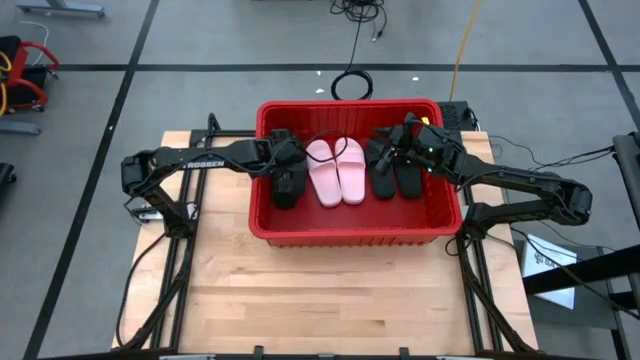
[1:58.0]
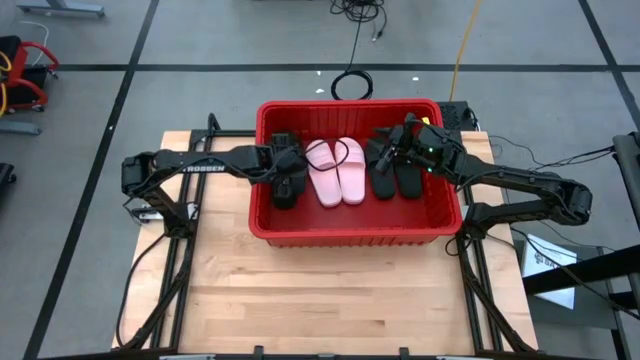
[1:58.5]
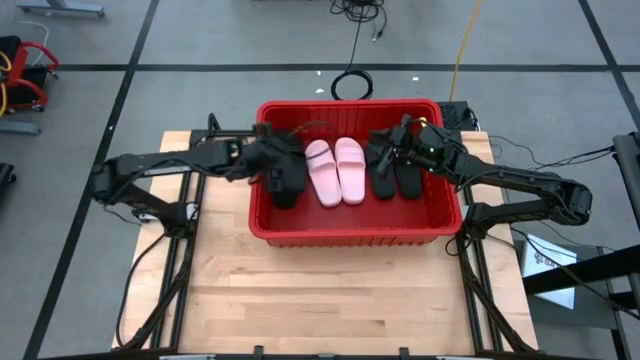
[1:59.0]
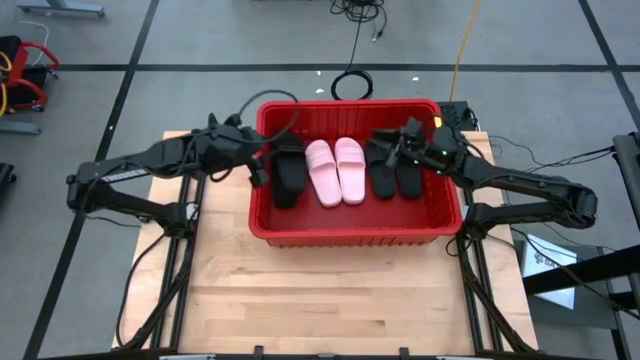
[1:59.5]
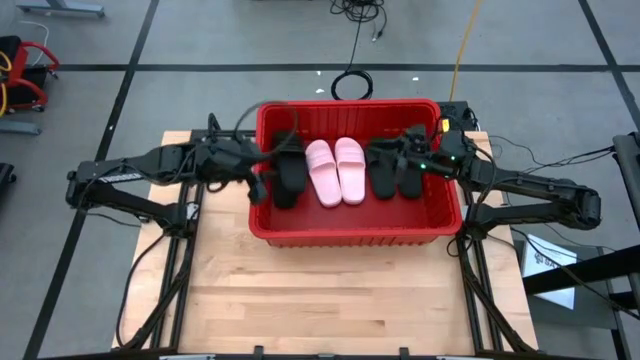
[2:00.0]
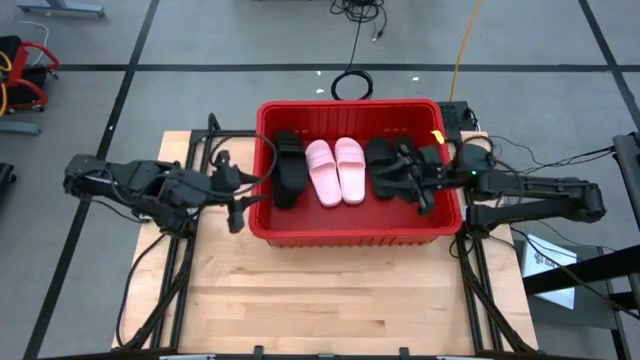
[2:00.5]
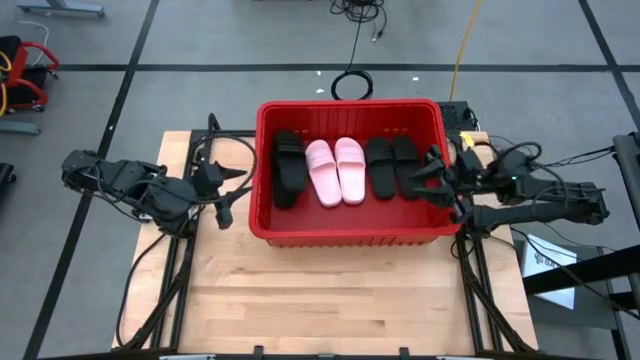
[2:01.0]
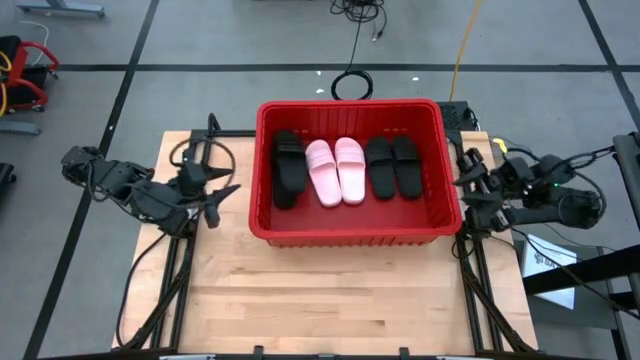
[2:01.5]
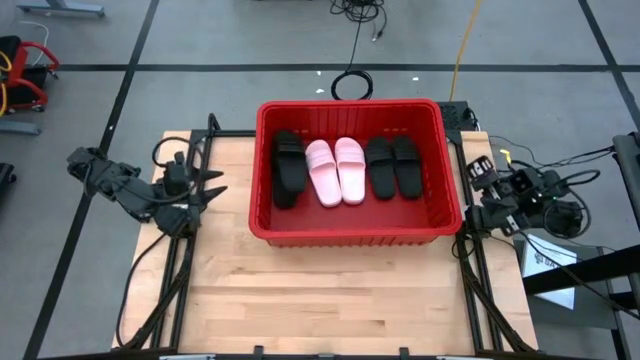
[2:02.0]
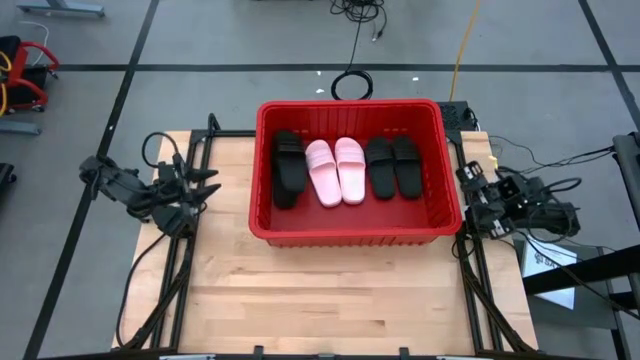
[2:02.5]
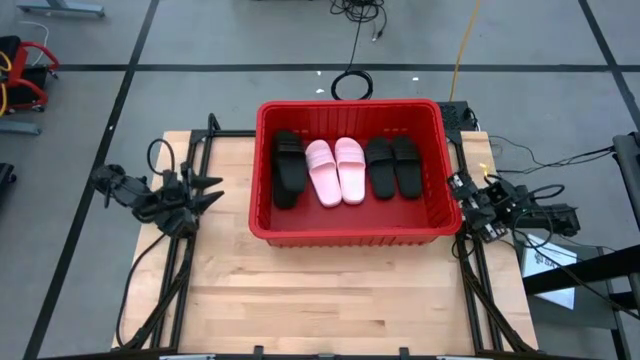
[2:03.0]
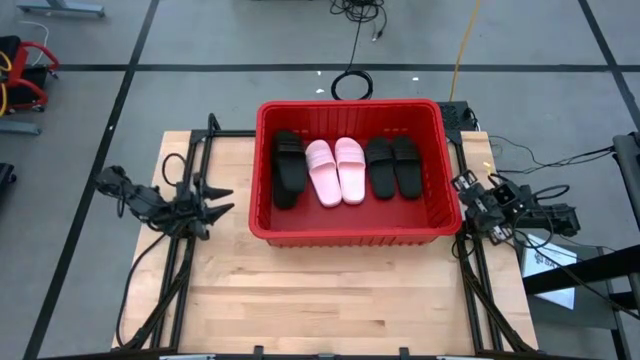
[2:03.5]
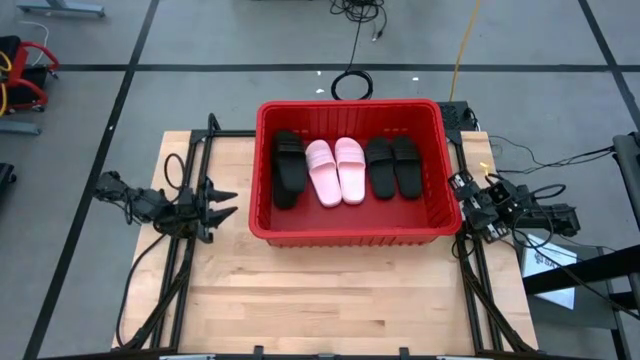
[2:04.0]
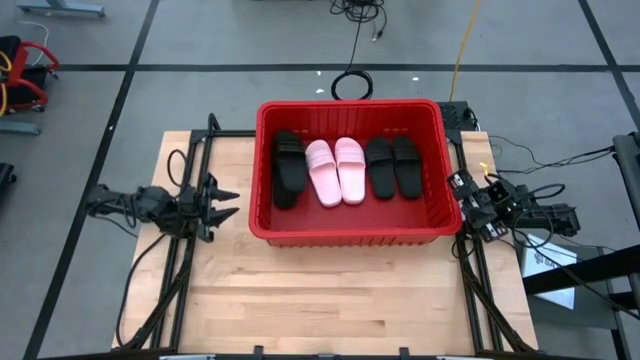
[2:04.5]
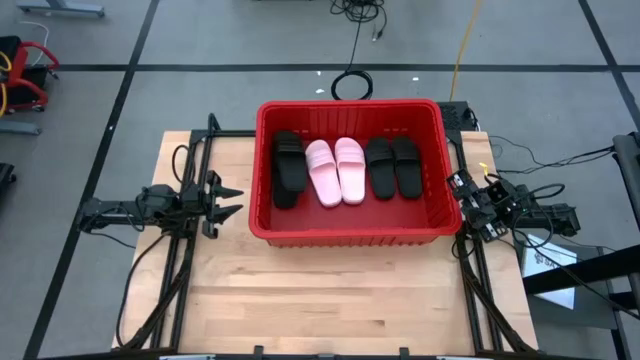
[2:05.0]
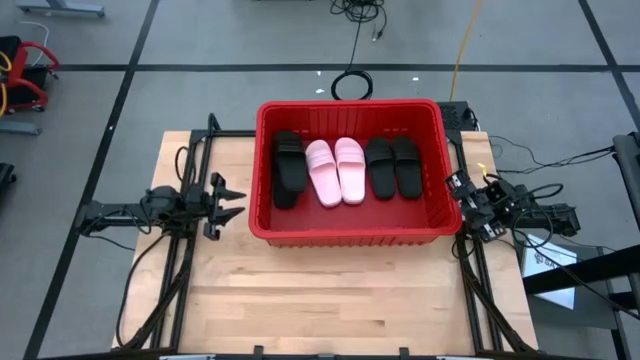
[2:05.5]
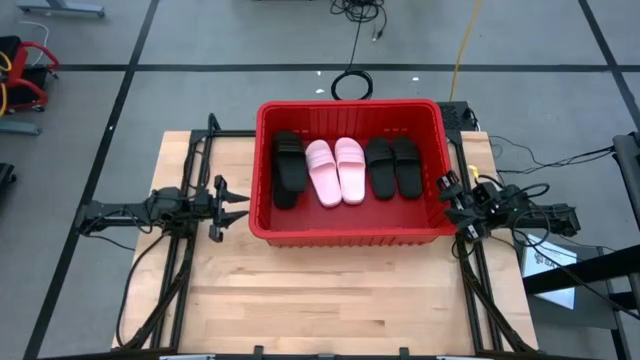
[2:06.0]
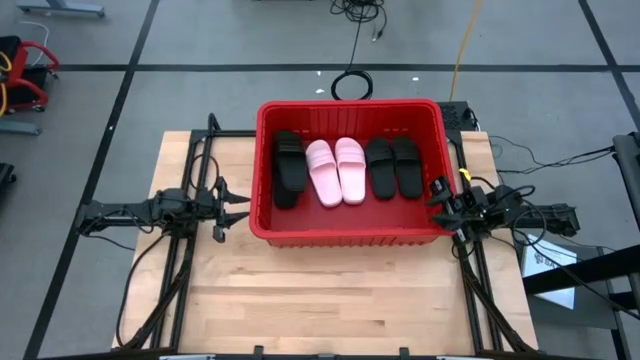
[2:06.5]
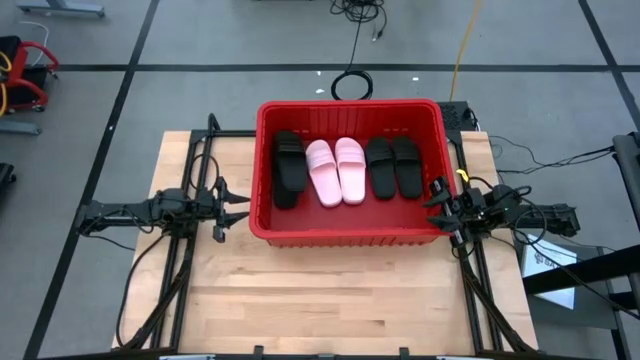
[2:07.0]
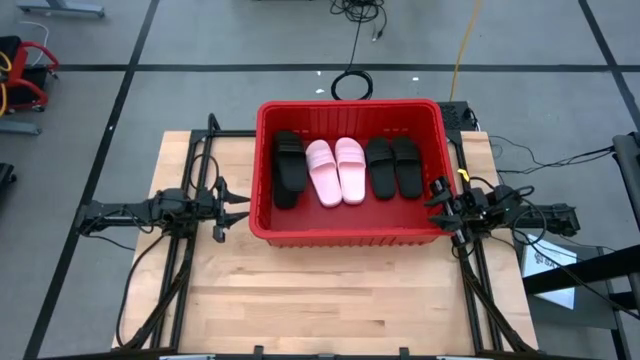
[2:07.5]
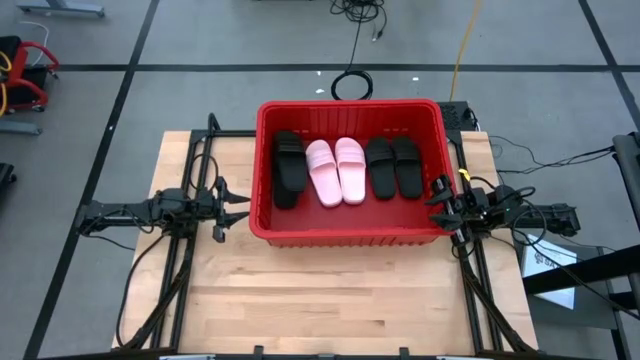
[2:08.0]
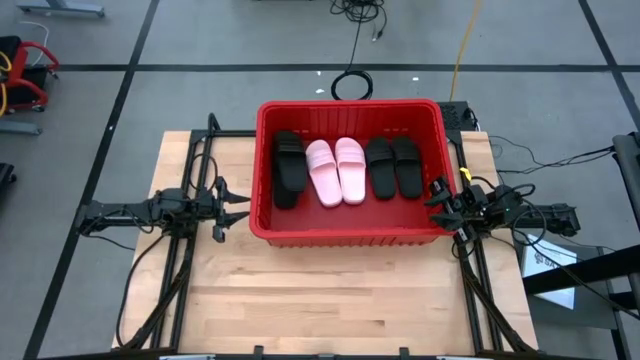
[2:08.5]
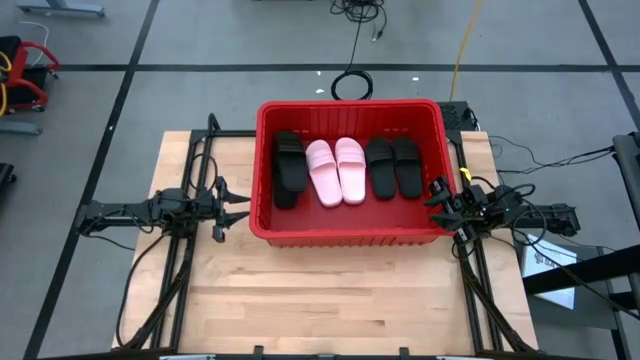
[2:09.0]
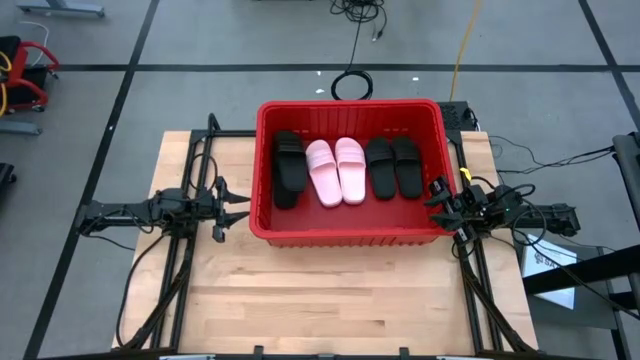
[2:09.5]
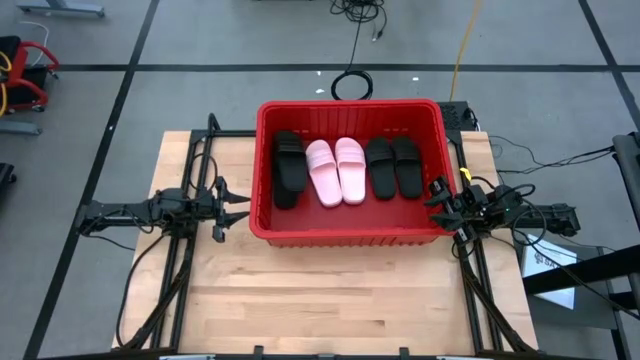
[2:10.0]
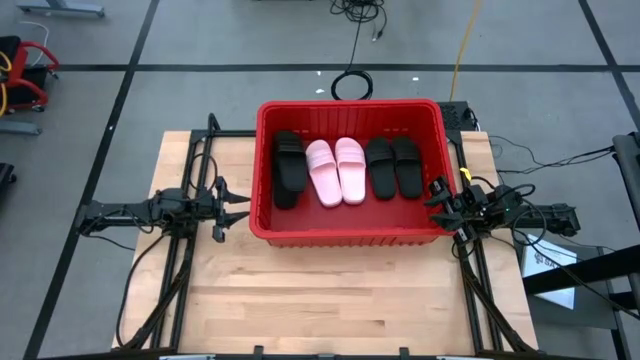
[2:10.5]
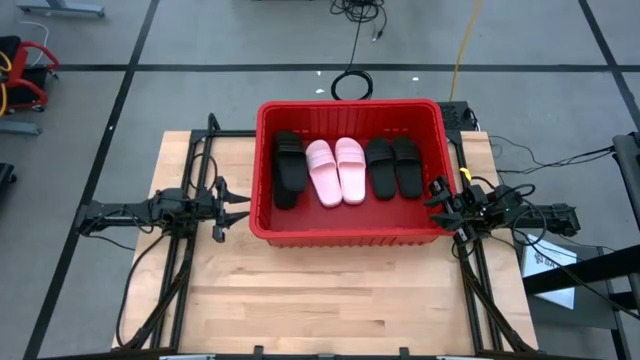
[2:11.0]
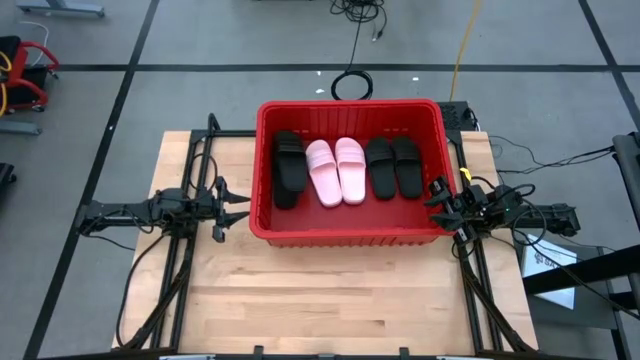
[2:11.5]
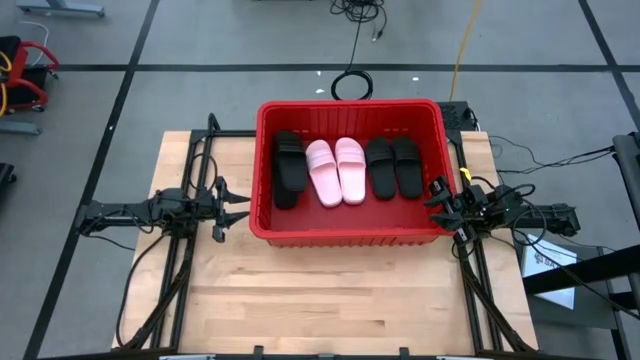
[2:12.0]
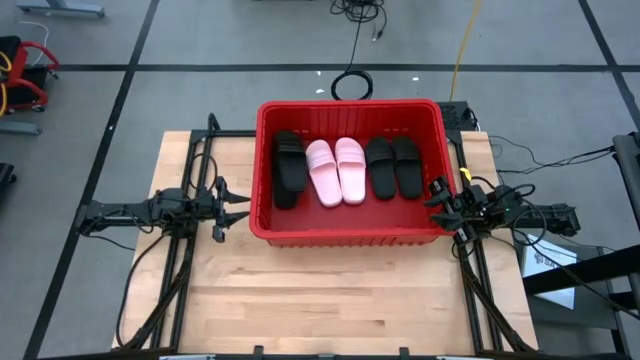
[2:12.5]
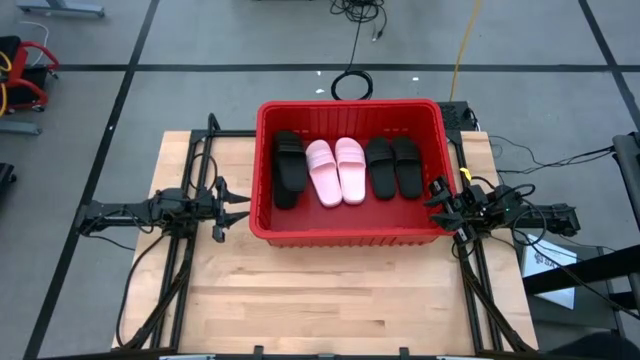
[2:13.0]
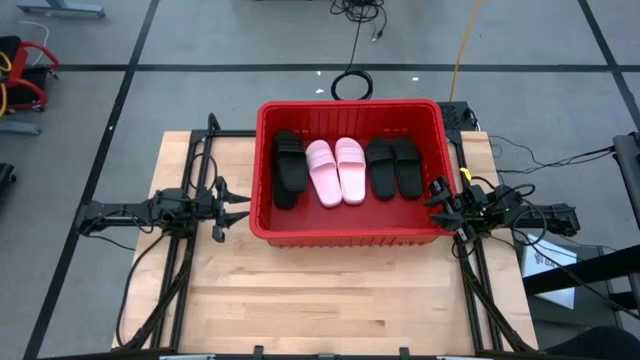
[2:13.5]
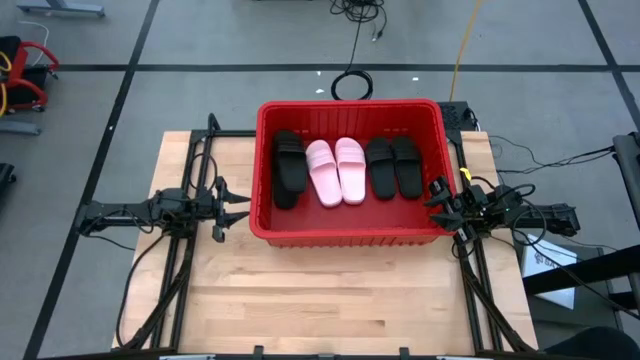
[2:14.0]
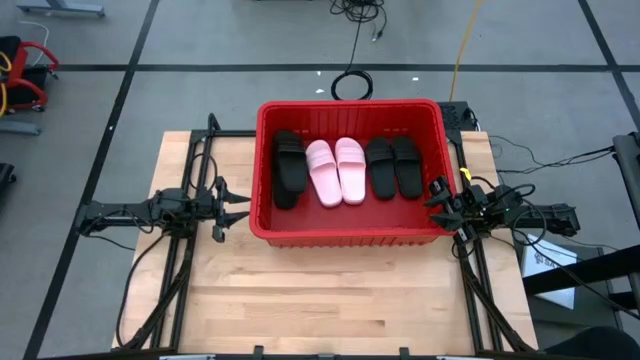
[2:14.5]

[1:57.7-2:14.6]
Task: Pick and place slides into bin
Return to home position

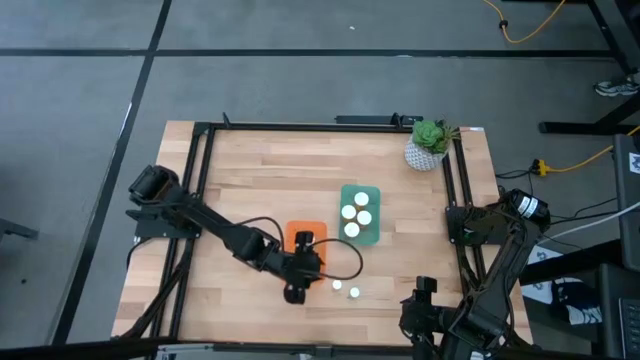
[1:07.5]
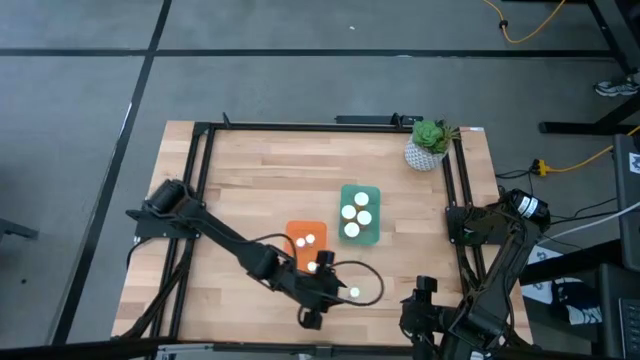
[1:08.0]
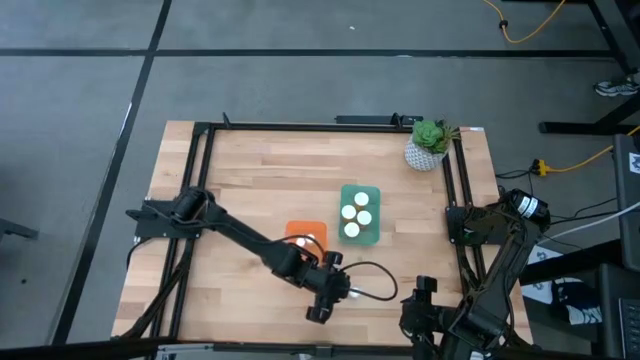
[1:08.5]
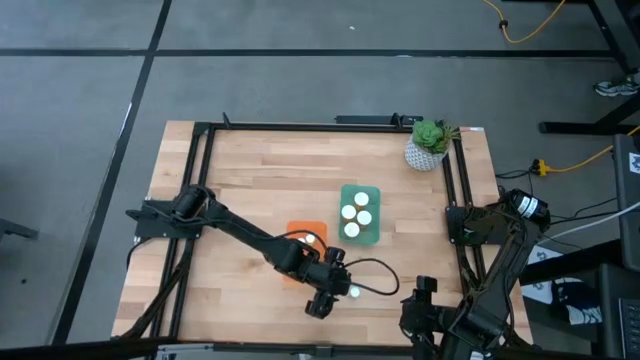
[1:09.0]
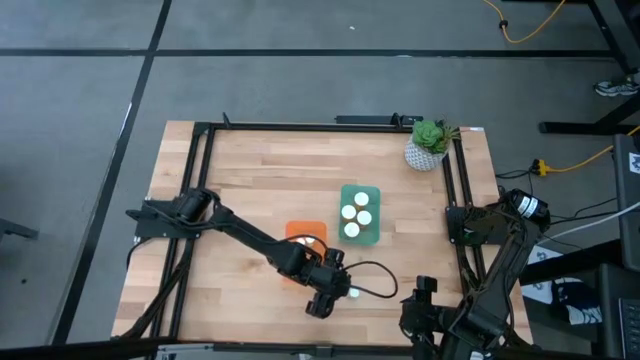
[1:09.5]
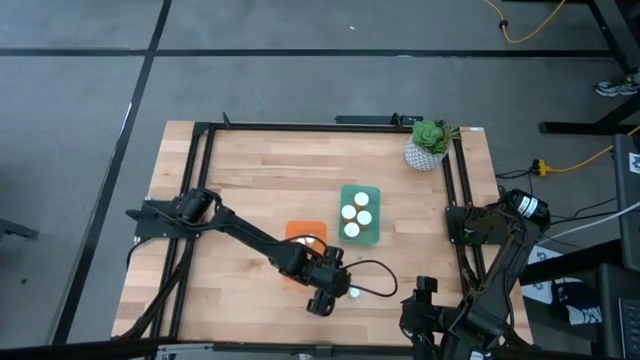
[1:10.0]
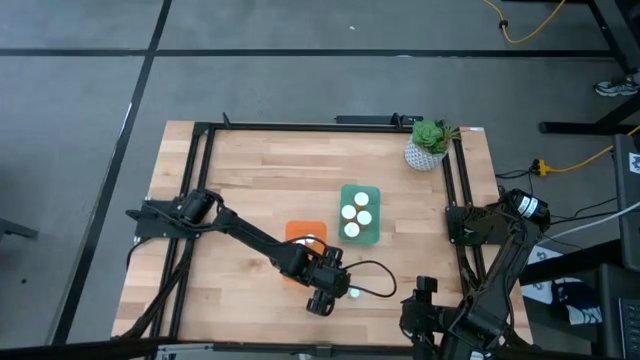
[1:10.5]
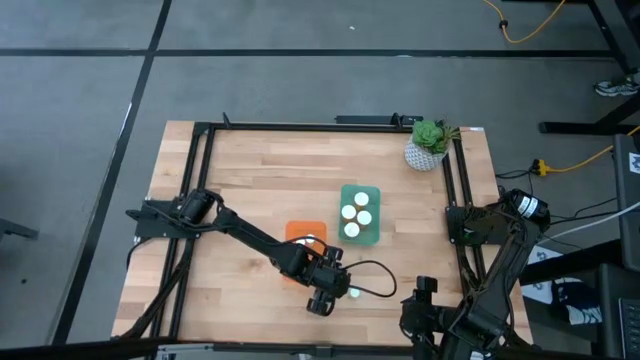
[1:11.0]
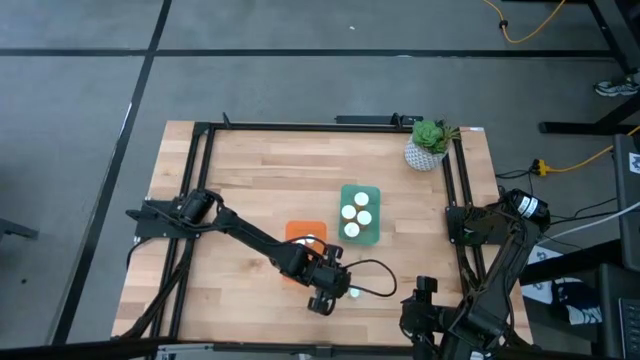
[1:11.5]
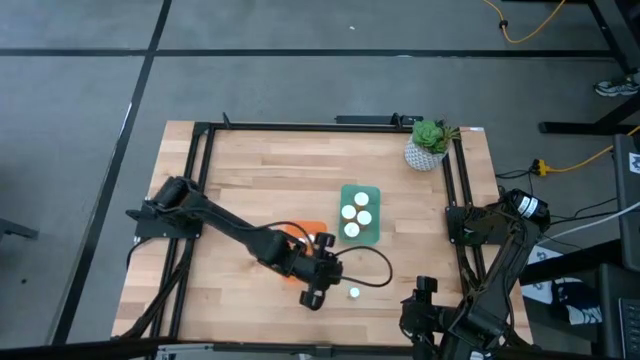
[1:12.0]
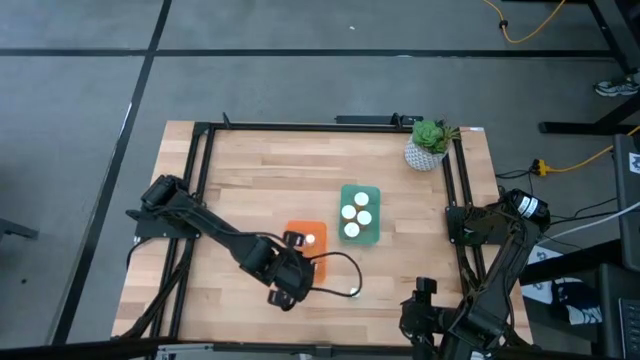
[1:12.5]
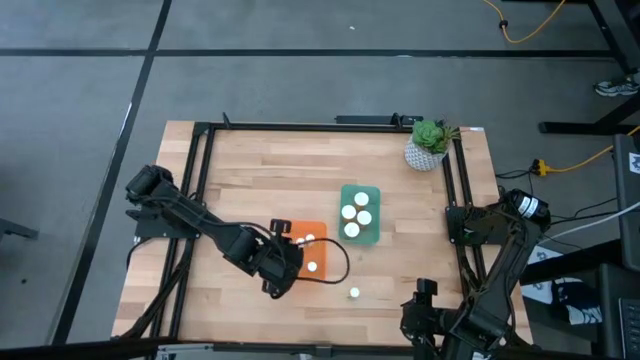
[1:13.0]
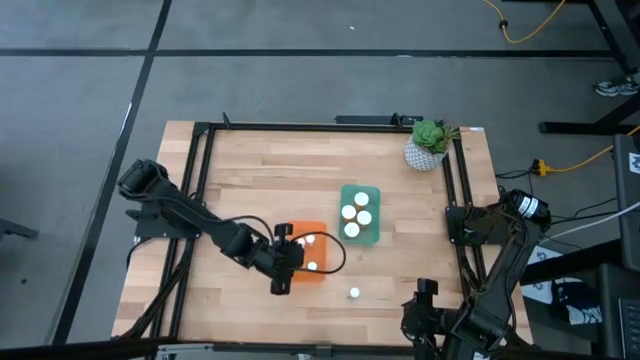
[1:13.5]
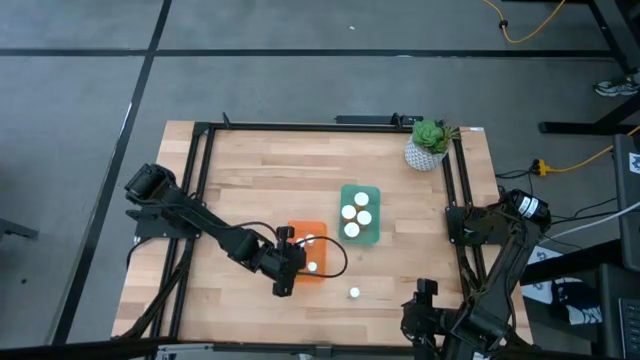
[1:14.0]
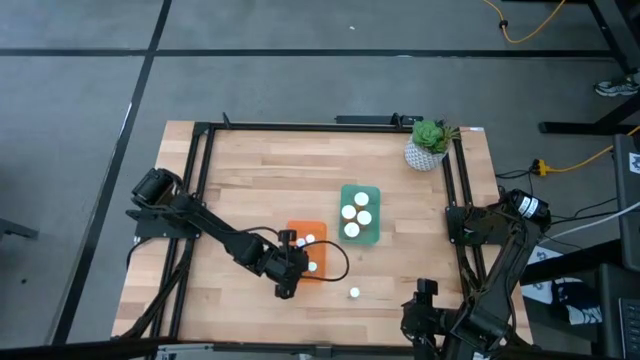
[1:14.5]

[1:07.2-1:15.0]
Task: Pick and place medicine bottles into bin by pill shape (circle, oval)
Put the small yellow tablet bottle into the orange bin
